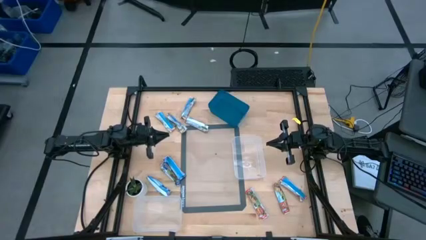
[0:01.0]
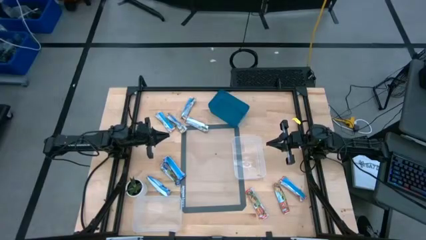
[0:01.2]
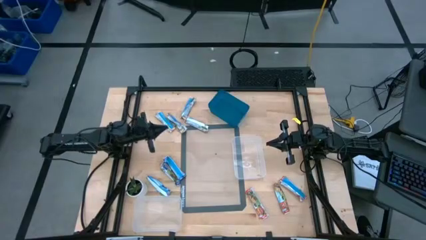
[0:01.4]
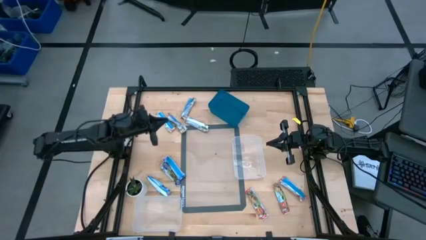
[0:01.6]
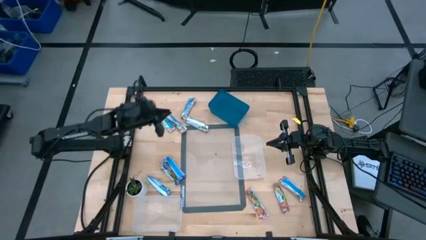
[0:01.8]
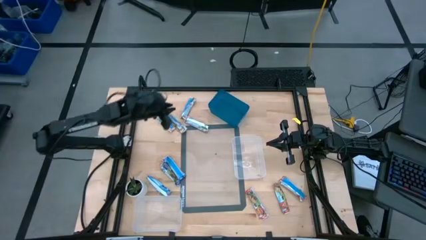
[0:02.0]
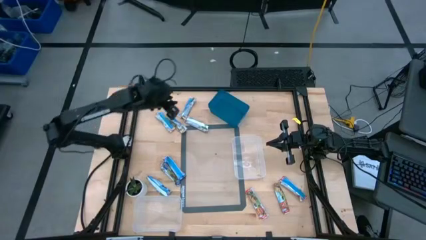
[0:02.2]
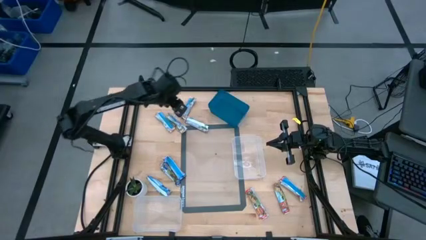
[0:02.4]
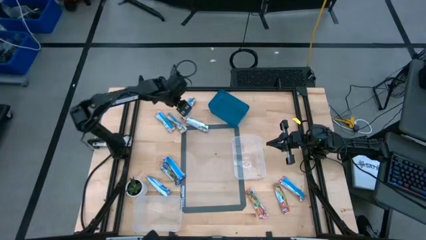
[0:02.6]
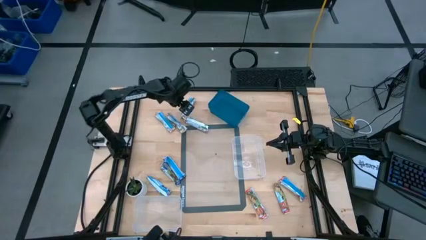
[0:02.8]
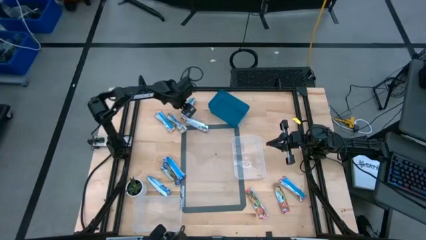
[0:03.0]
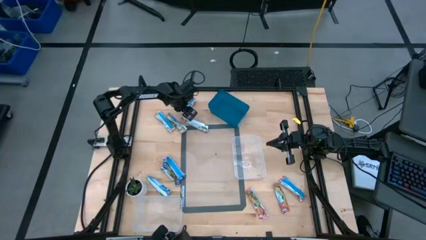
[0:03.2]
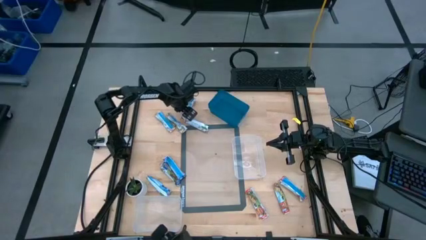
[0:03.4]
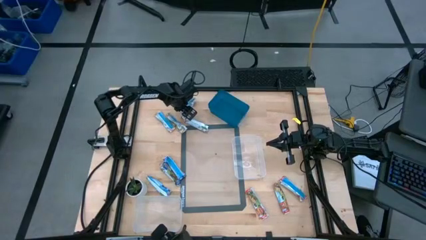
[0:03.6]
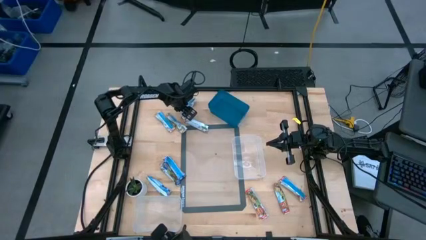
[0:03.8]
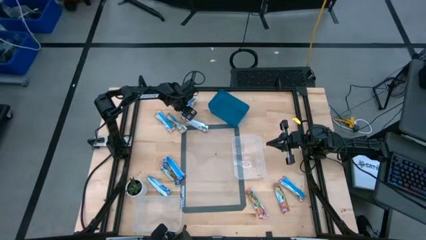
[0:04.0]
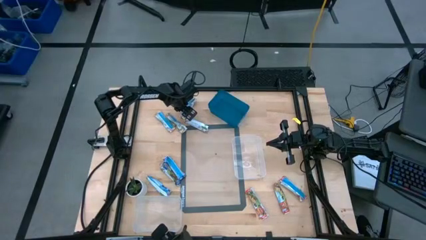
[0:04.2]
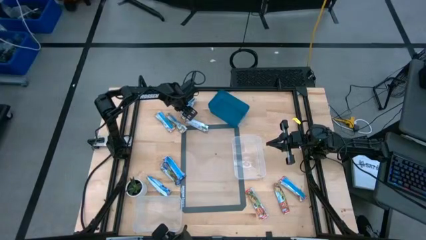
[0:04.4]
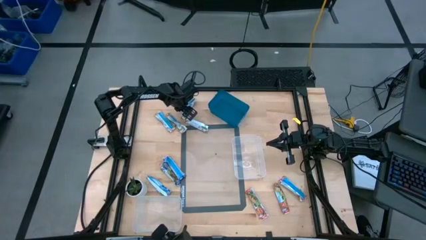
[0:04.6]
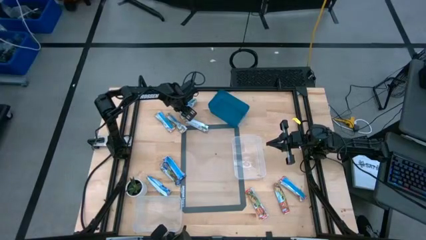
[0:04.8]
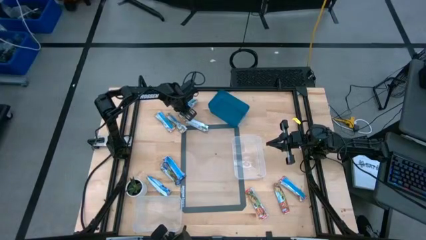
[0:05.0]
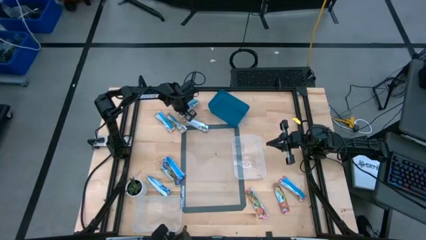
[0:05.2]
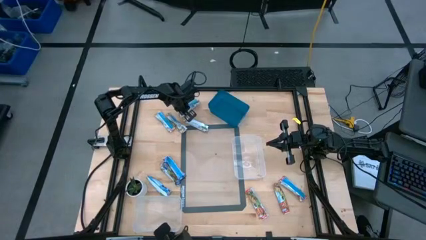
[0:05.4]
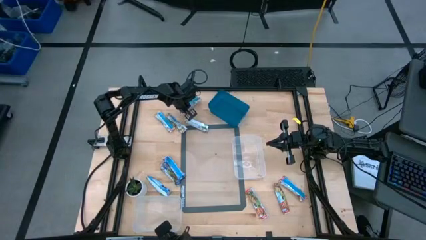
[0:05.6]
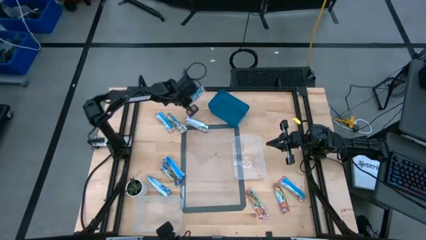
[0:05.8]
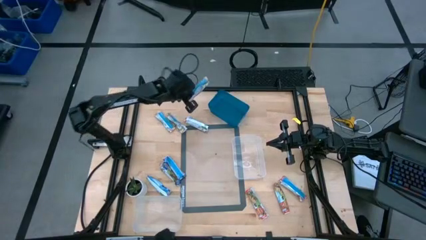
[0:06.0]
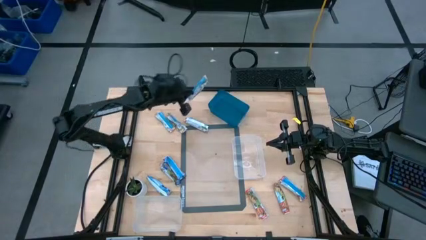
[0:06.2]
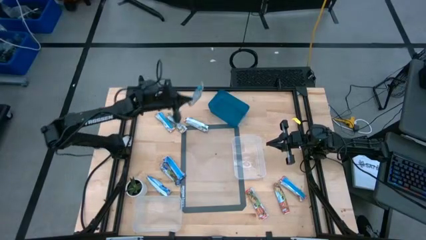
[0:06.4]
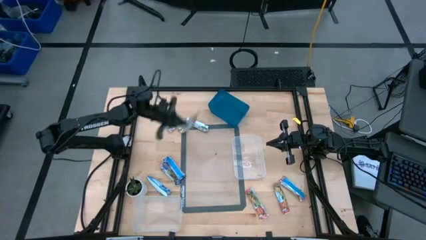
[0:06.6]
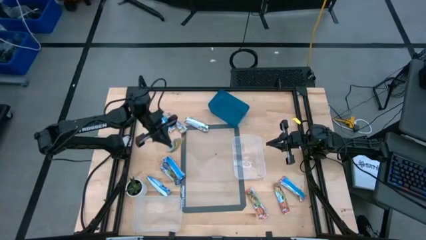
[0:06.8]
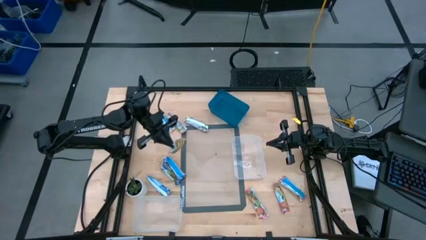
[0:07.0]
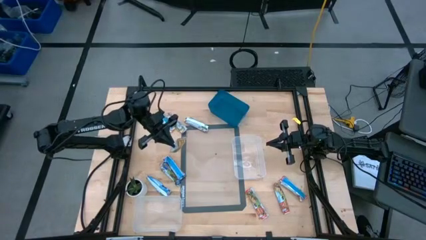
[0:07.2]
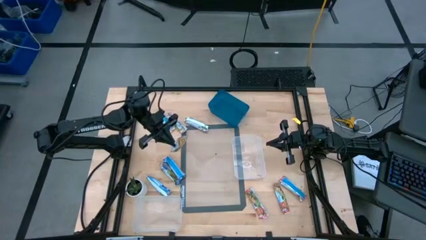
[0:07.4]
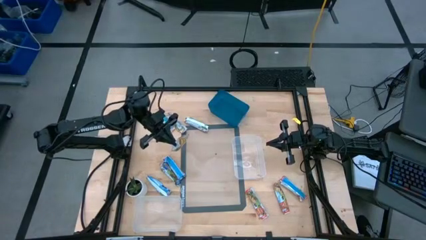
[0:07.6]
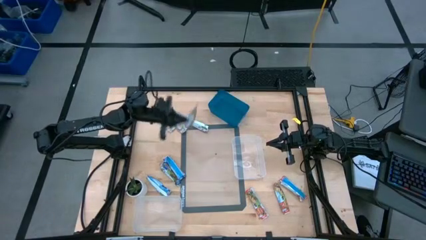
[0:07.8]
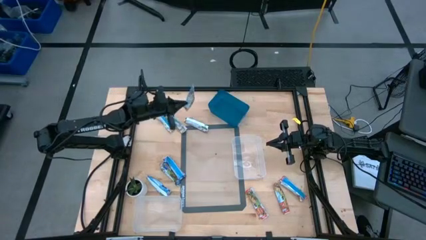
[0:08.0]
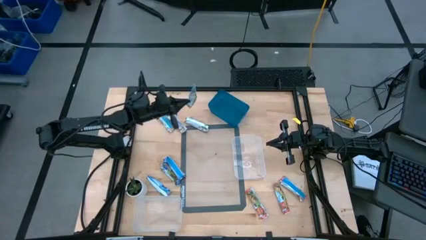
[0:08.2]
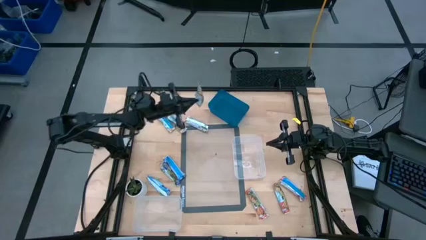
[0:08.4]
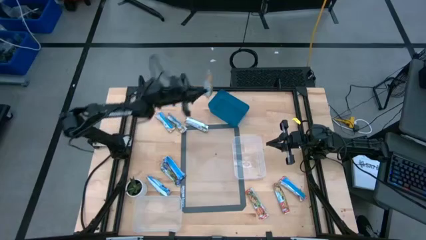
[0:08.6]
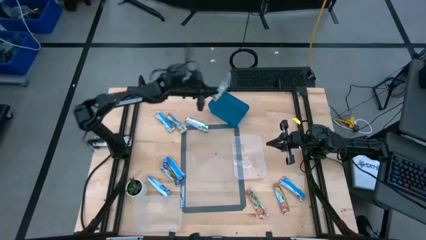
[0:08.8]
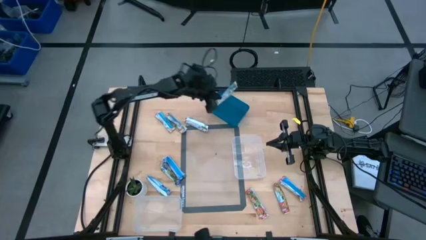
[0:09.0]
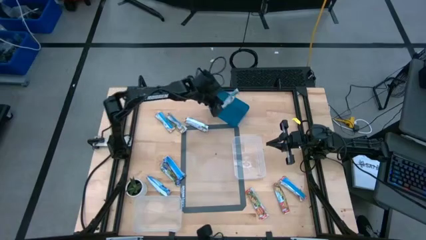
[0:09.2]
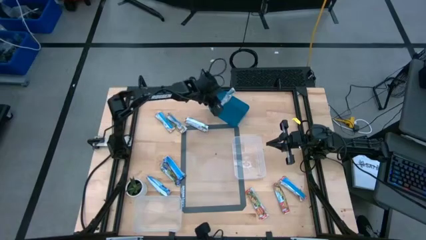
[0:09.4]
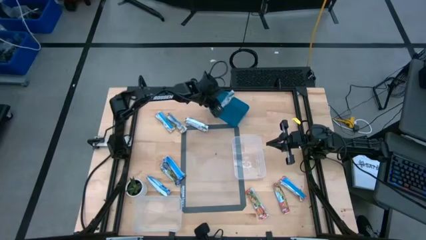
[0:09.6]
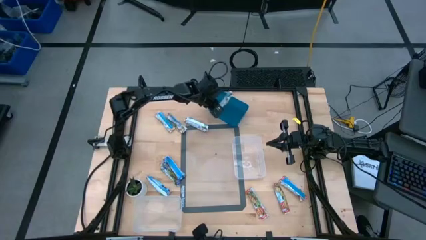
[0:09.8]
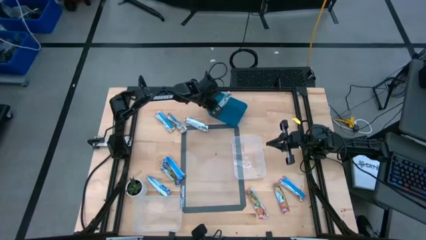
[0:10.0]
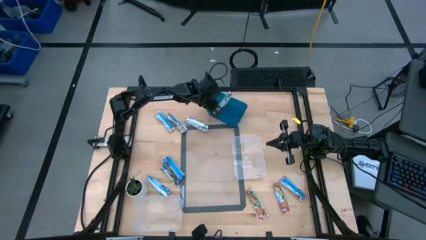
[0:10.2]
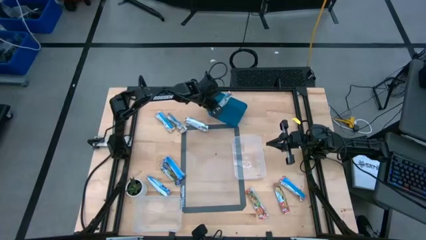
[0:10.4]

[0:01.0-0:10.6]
Task: Pick and place Granola Bars by type
Put the orange granola bar into the blue bin

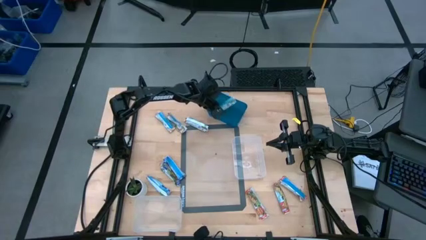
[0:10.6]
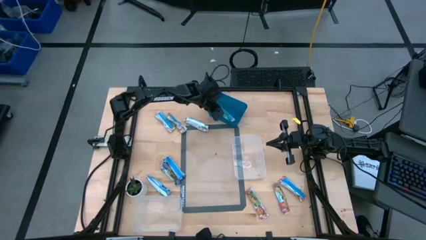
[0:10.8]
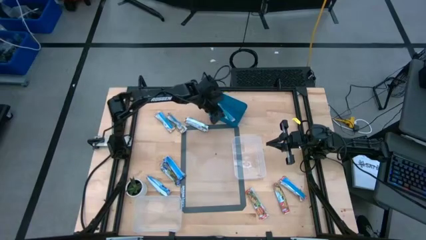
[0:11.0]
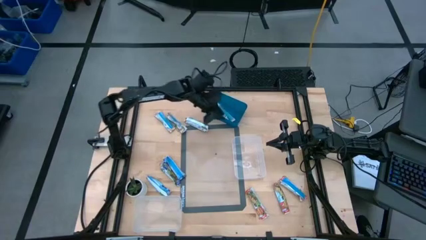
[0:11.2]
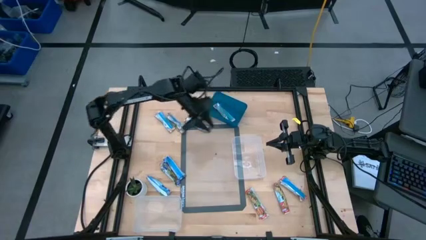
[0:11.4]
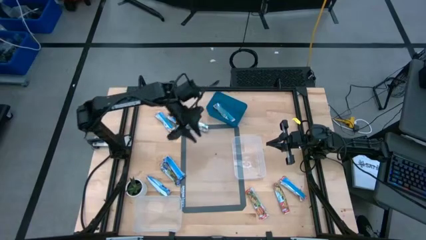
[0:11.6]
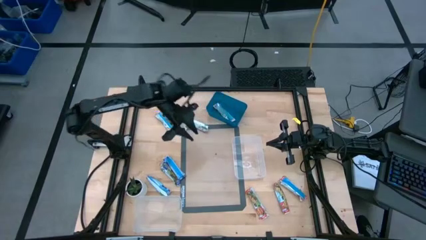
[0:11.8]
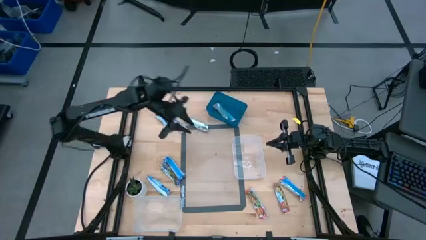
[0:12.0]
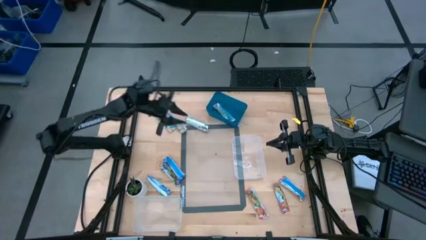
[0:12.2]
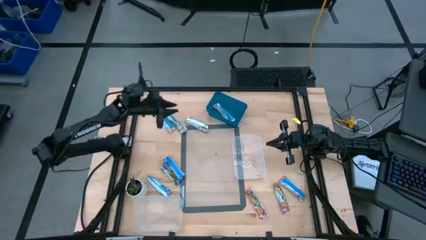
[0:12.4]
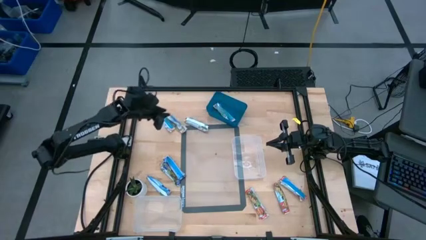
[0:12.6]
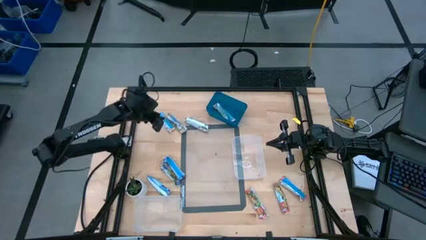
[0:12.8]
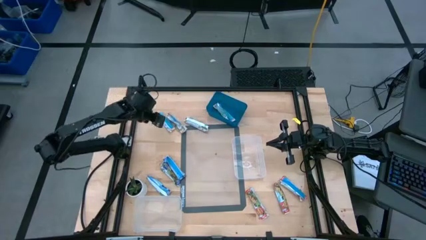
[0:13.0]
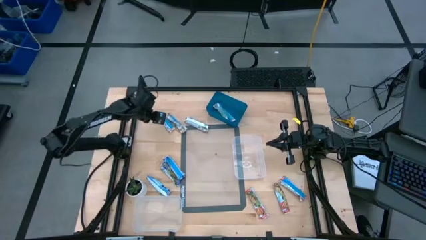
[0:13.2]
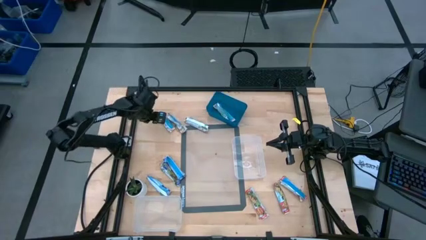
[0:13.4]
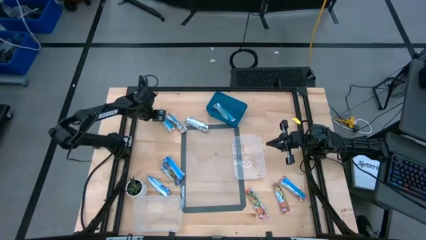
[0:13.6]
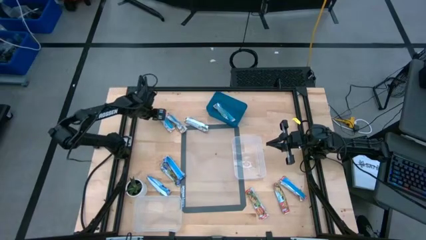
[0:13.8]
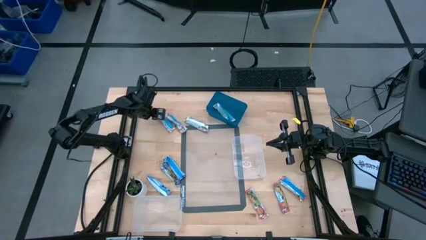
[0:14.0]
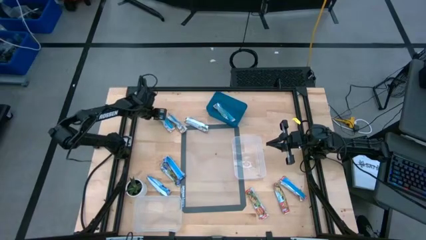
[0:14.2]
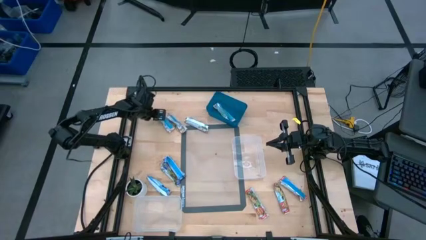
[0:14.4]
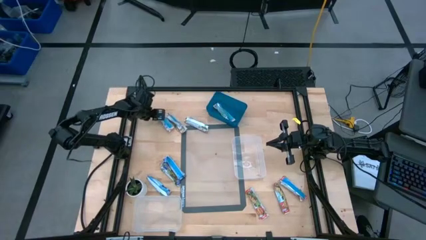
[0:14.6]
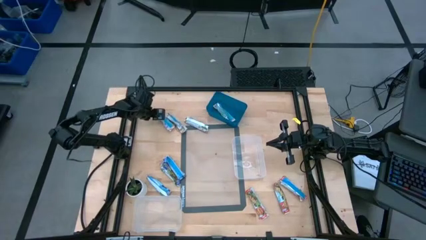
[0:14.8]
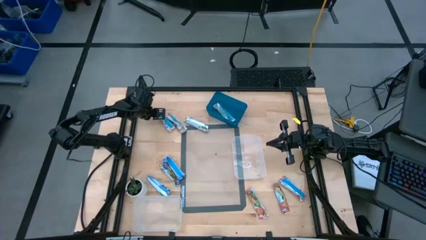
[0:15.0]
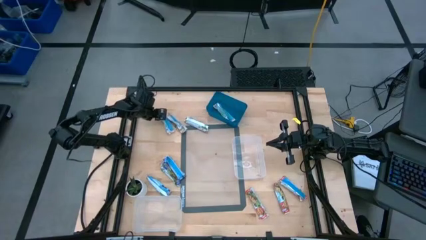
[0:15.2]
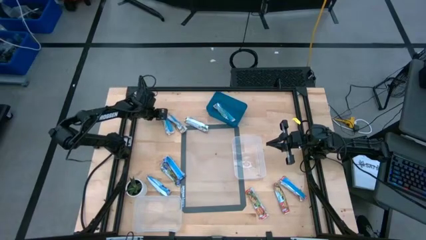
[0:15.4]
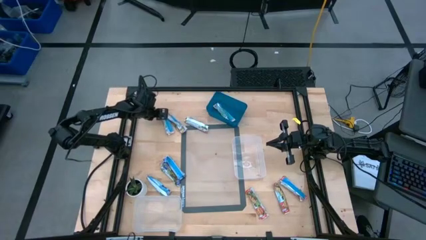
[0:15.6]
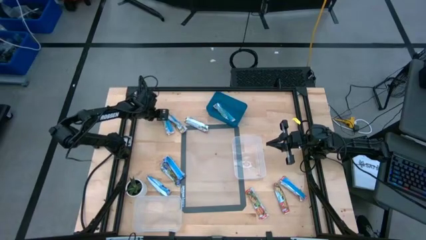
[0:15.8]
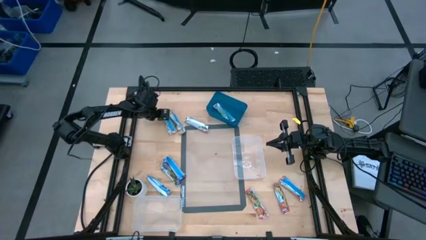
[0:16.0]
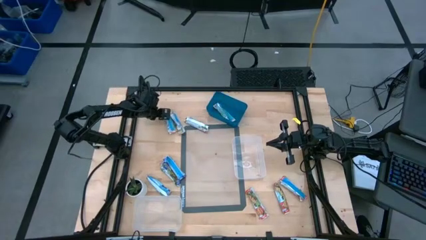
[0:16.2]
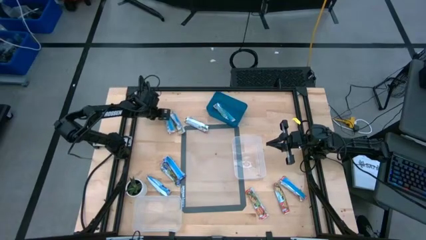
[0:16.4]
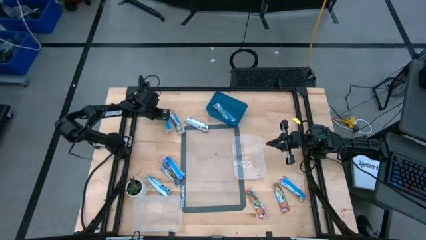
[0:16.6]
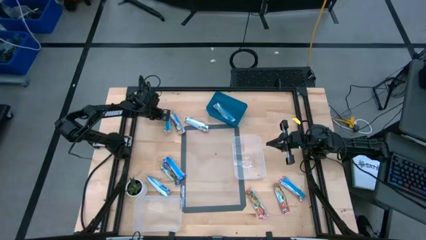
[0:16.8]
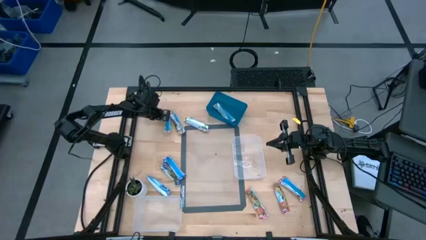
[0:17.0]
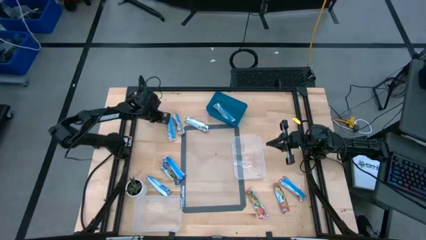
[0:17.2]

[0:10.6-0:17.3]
Put the orange granola bar into the blue bin
